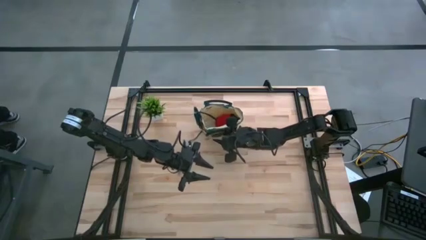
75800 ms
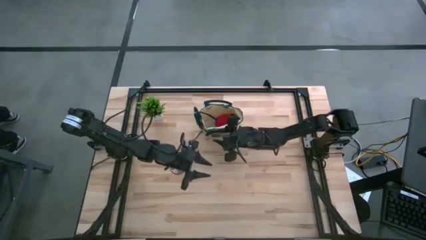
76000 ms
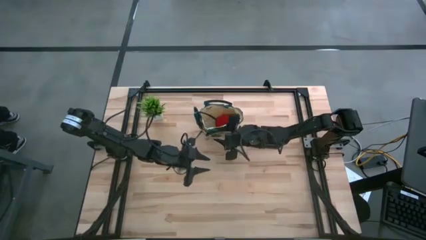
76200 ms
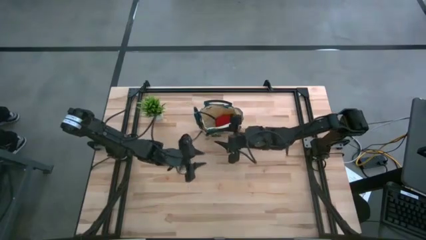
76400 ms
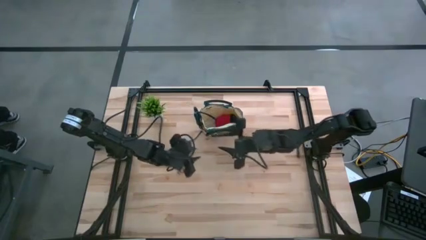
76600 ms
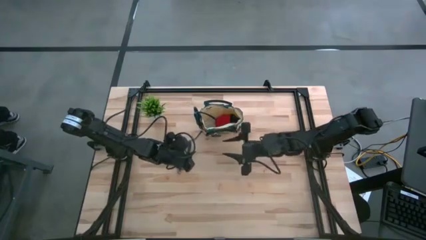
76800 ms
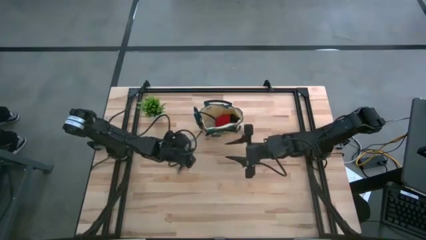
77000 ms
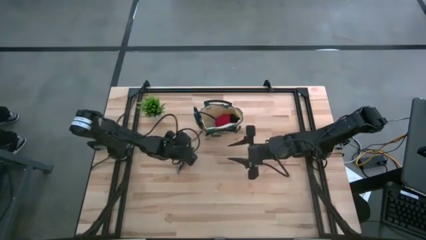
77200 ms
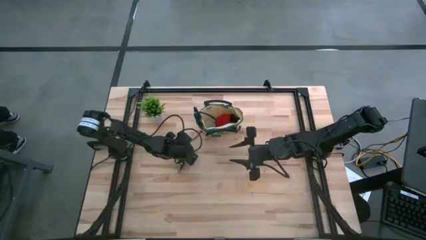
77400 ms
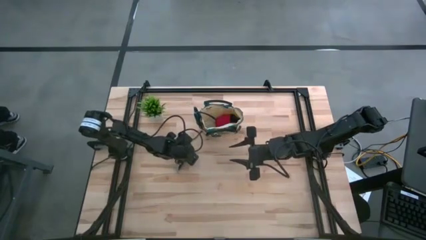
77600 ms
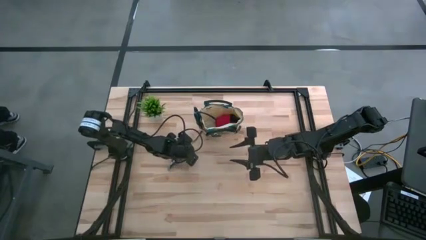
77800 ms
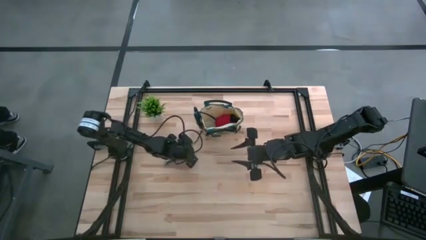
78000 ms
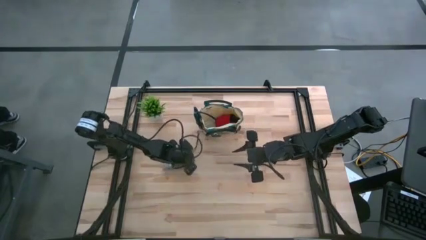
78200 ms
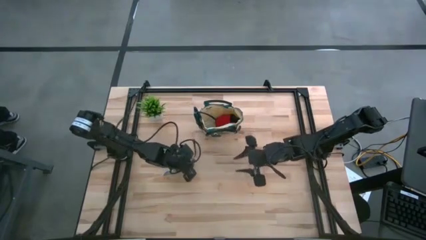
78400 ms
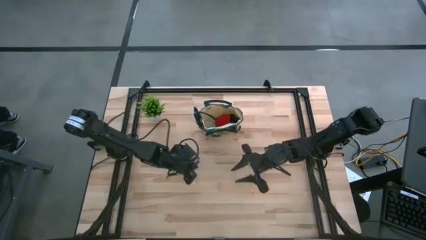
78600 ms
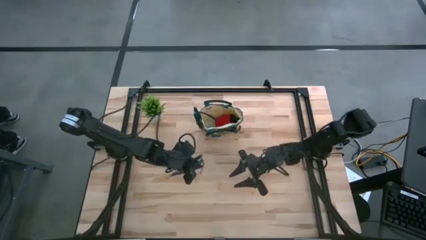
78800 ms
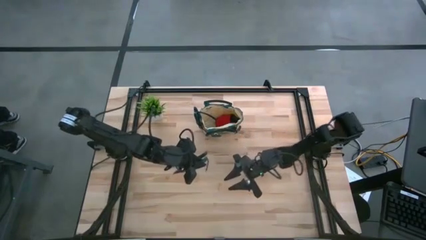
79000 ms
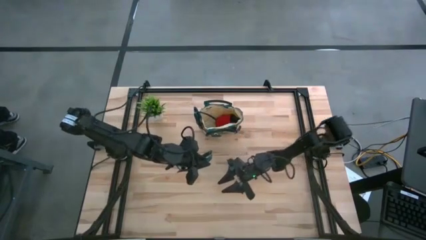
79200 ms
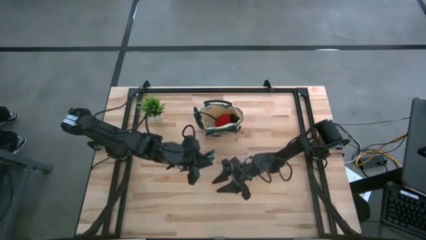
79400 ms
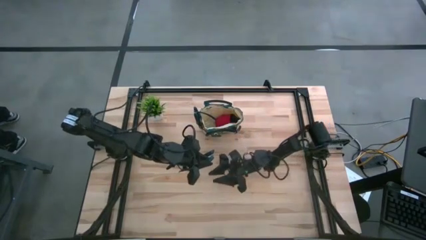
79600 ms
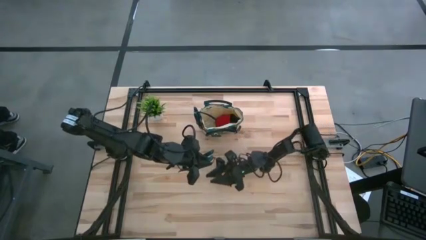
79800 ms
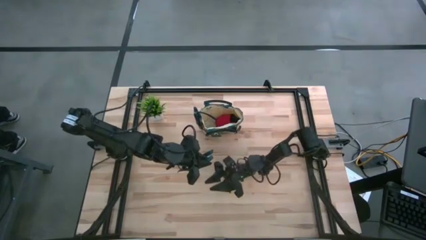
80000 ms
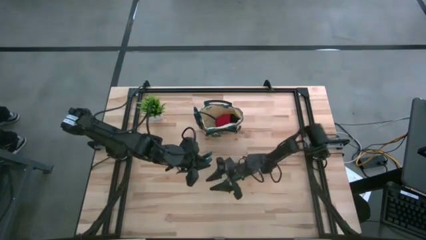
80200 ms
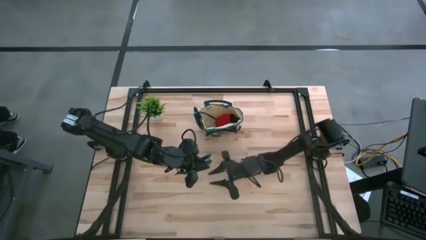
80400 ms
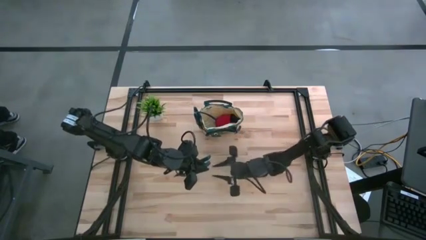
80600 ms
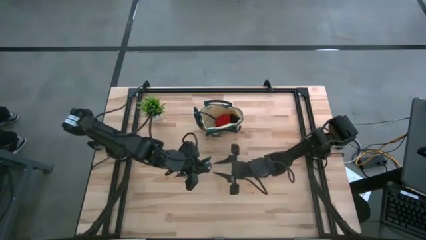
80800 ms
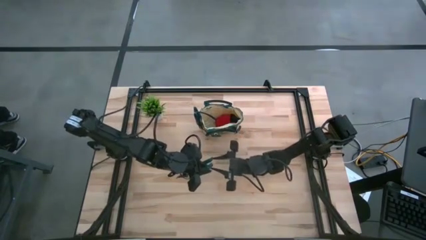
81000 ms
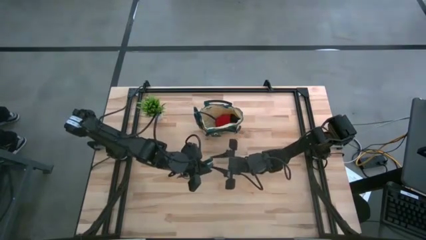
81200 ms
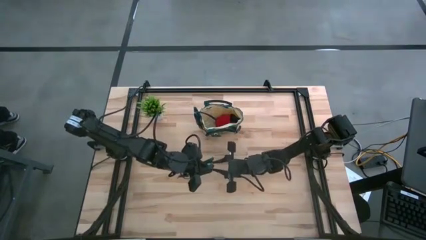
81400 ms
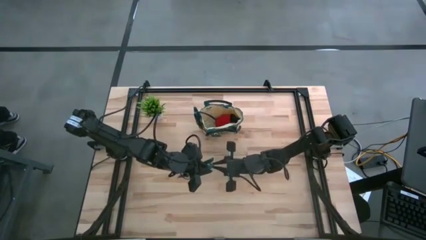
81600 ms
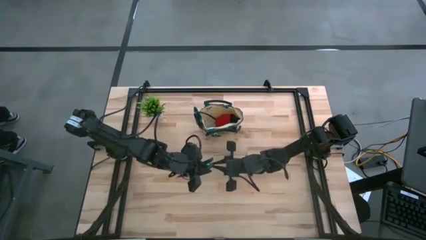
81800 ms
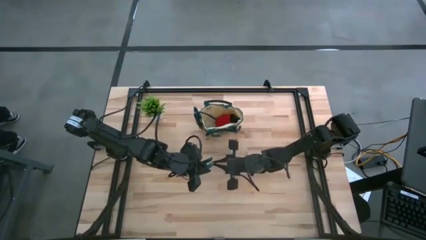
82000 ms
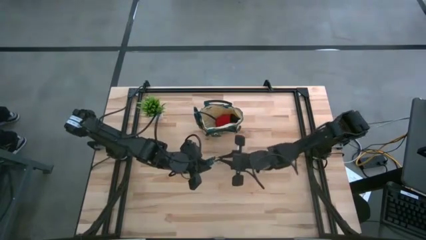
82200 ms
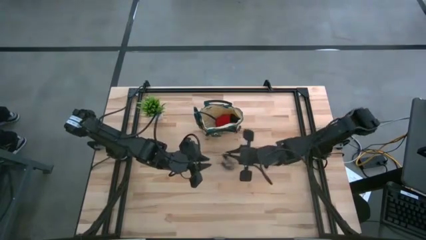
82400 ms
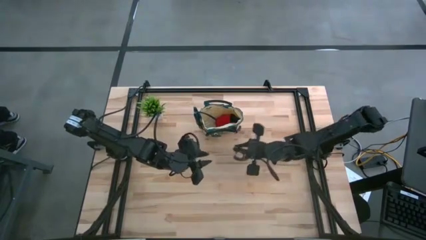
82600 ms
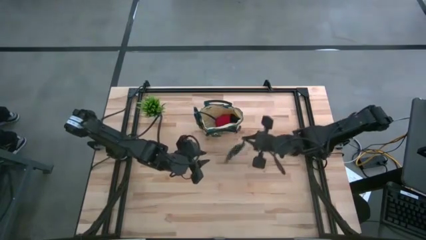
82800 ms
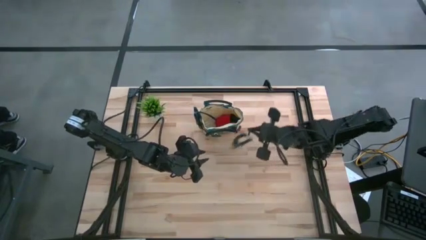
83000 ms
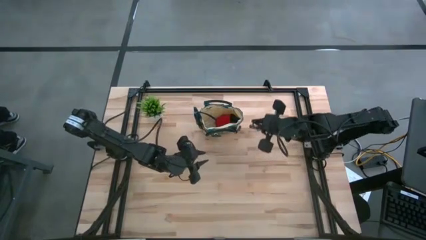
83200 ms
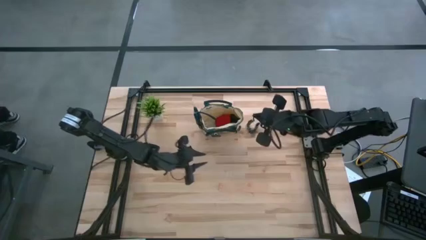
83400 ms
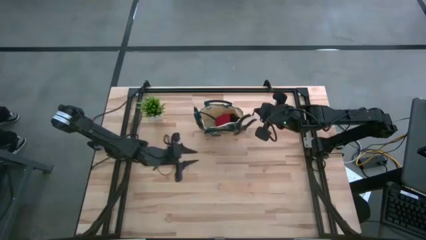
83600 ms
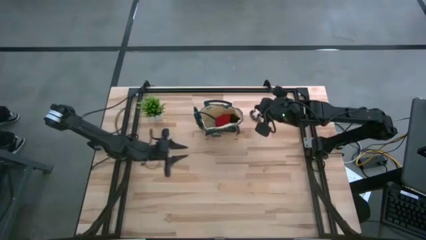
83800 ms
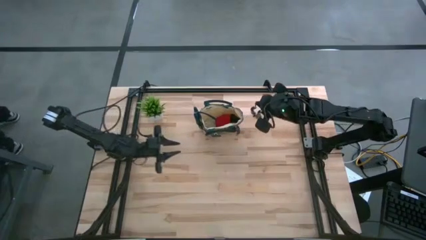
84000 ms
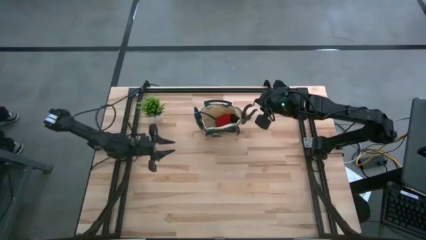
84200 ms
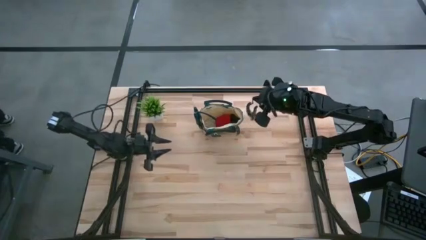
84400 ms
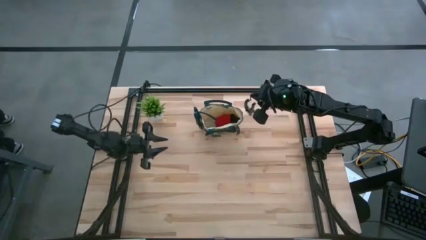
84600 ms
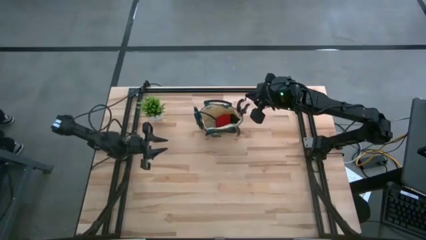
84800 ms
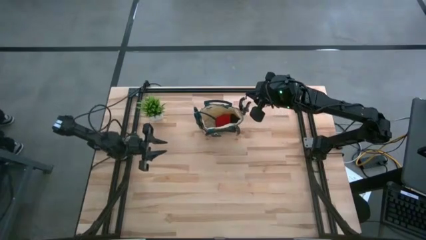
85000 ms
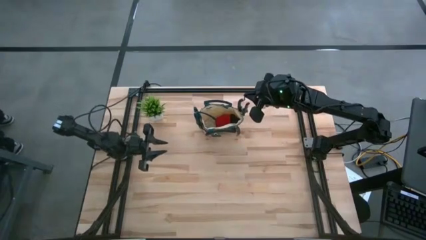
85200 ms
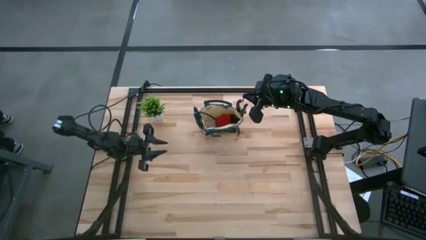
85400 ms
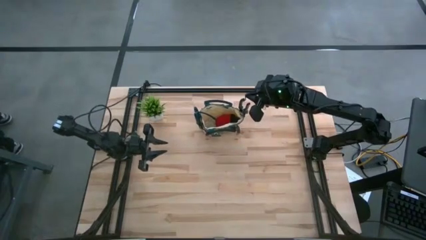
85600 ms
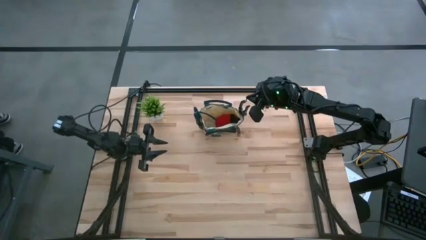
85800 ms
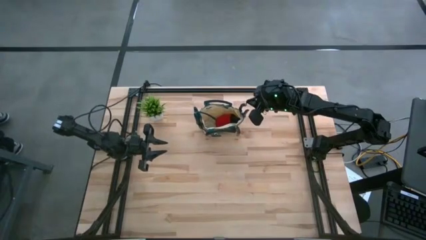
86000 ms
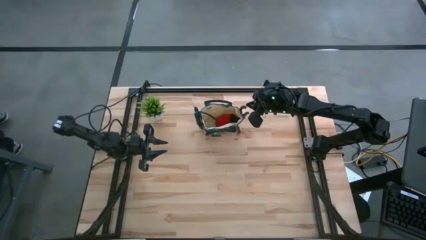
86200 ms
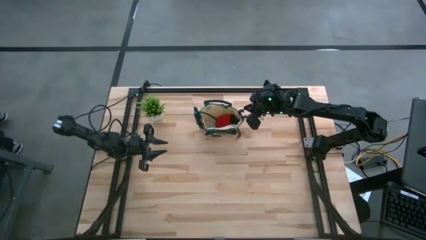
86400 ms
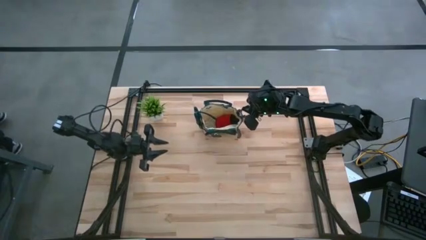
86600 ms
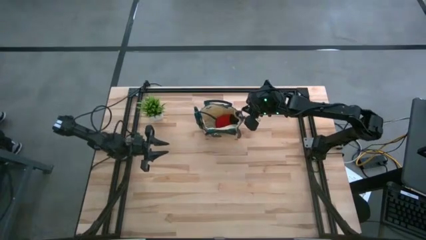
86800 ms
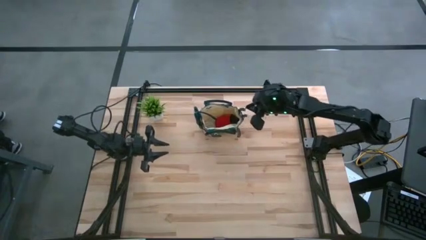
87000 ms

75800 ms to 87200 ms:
Task: Pick & Place Garden tools in Gardening bag
Put the green scissors into the bag

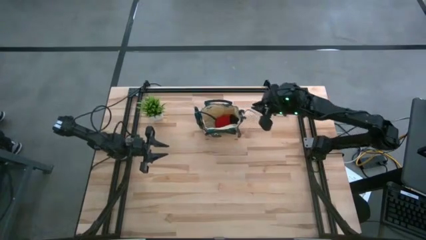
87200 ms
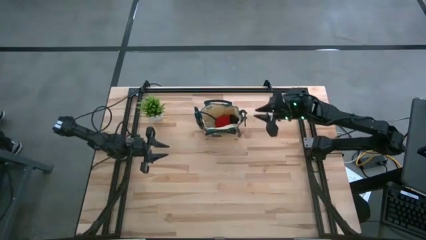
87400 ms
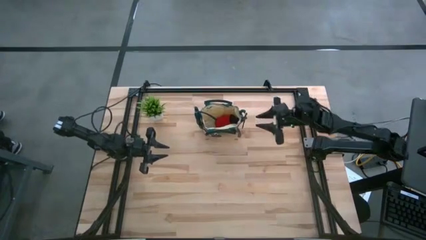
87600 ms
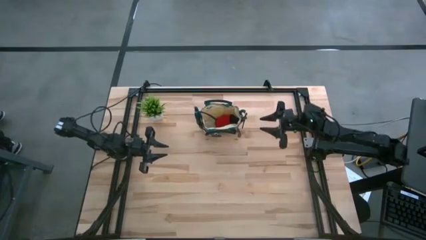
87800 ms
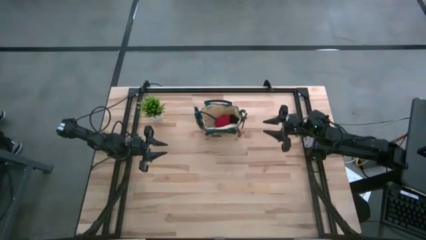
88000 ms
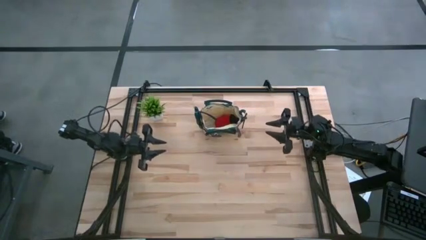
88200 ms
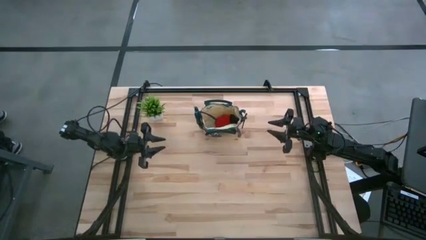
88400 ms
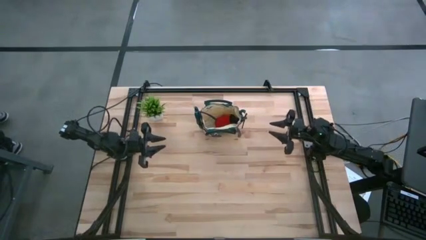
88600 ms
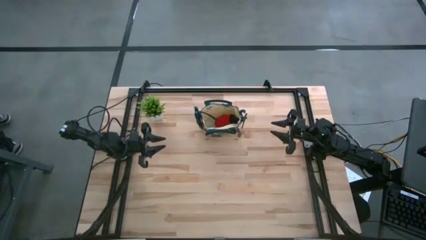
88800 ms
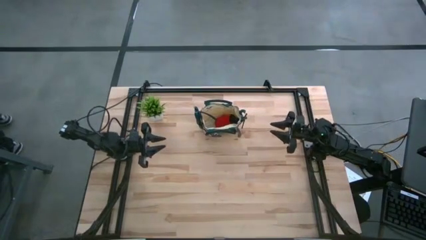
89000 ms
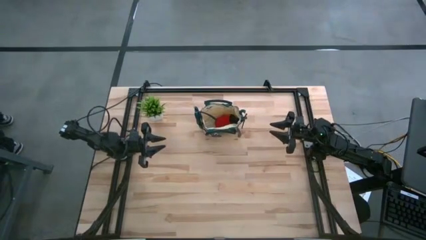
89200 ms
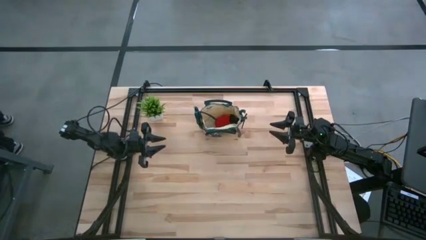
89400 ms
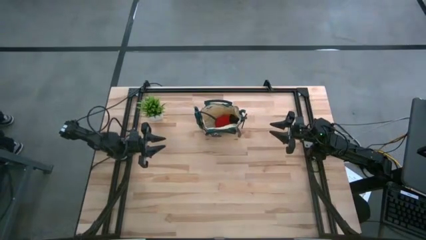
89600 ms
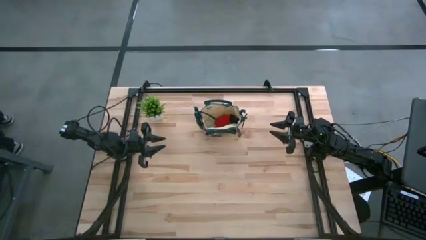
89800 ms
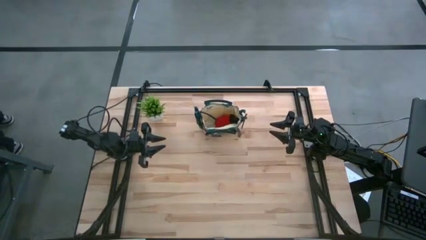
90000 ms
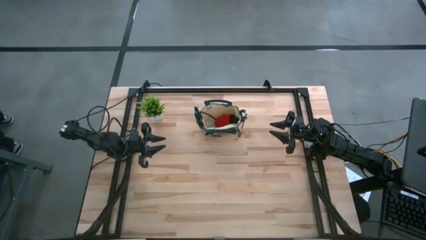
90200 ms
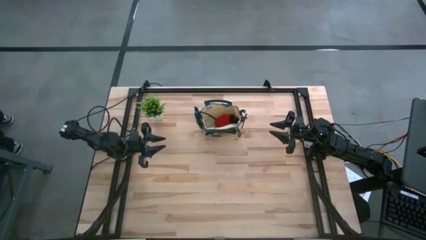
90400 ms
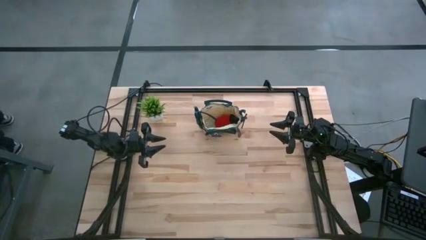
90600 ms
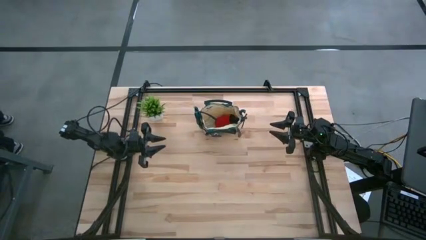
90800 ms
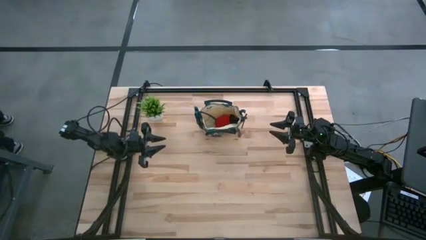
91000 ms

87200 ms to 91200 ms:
Return to Home Position
